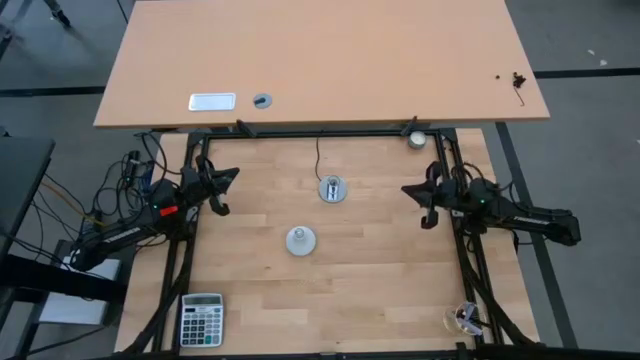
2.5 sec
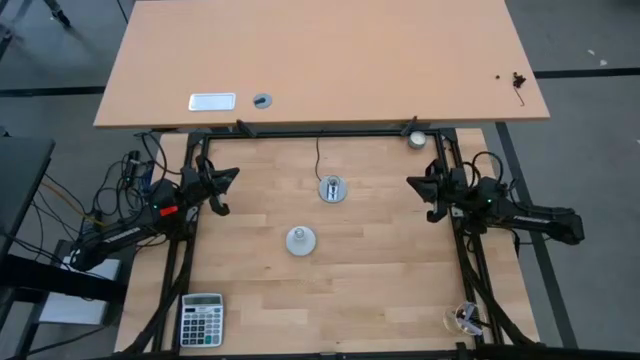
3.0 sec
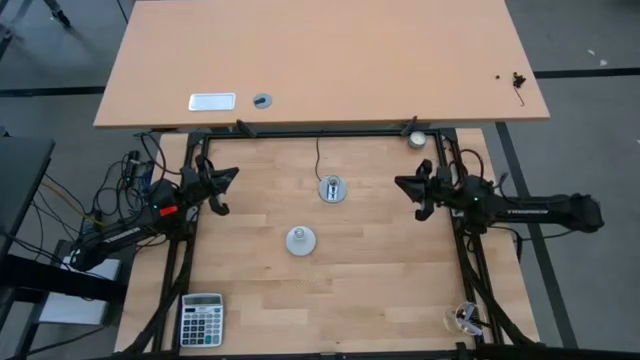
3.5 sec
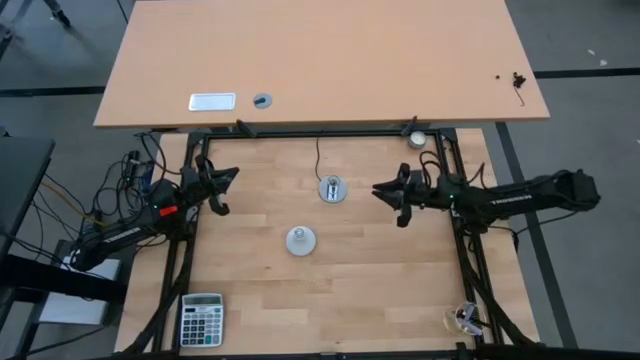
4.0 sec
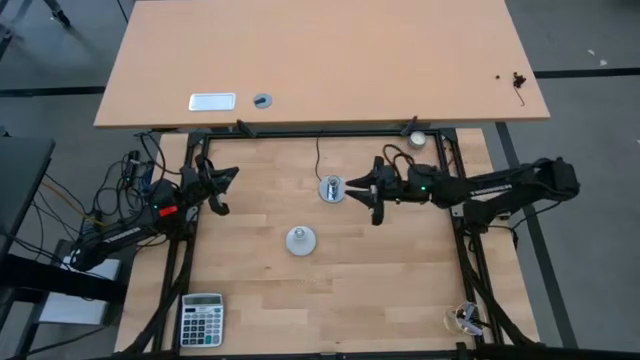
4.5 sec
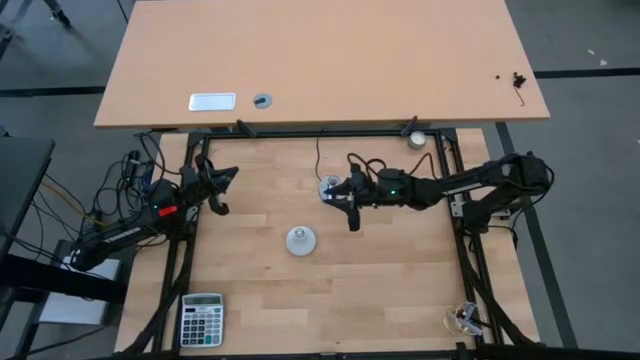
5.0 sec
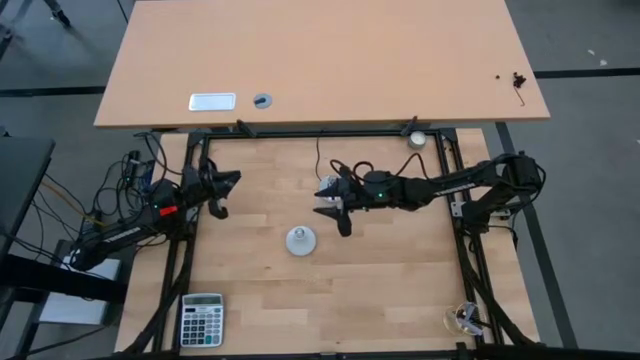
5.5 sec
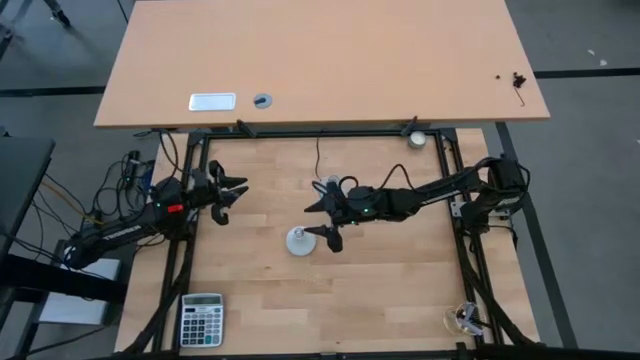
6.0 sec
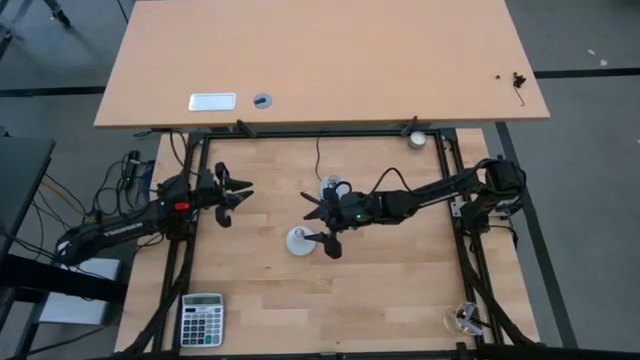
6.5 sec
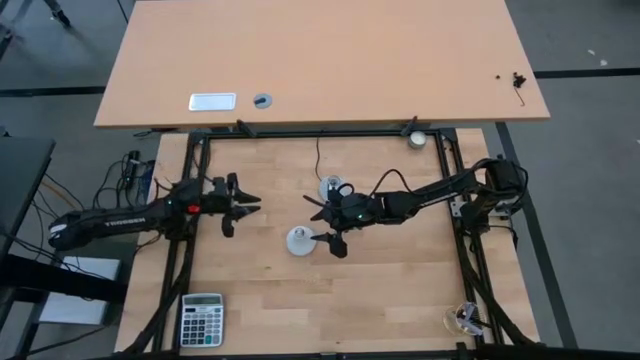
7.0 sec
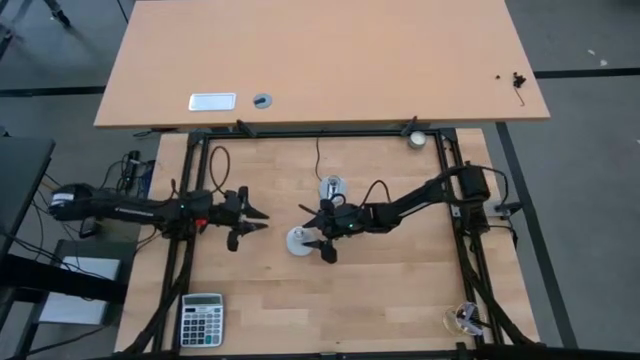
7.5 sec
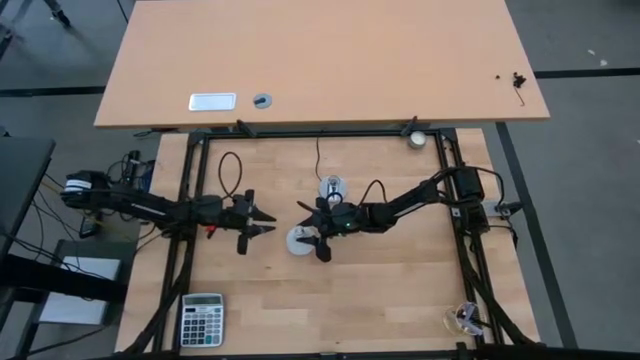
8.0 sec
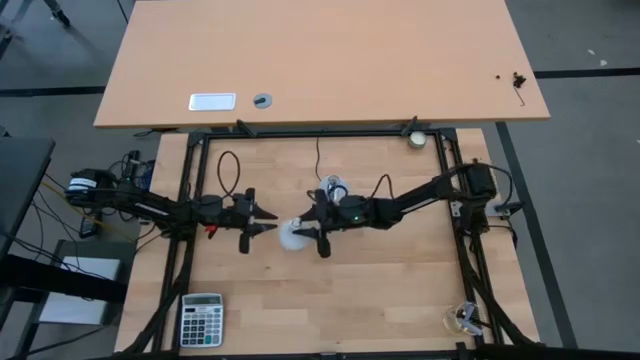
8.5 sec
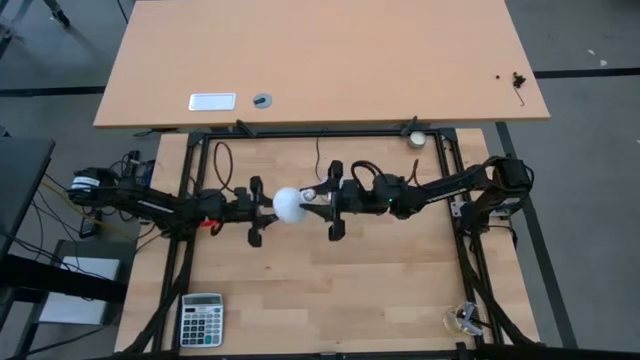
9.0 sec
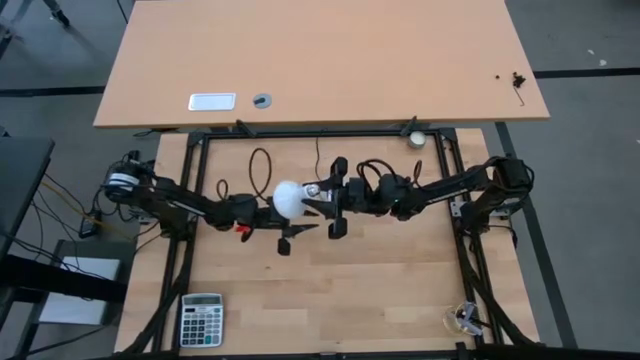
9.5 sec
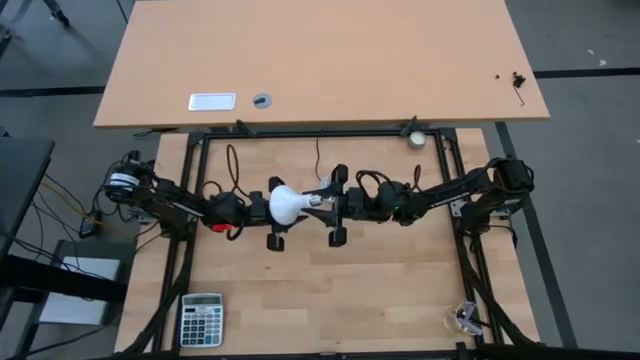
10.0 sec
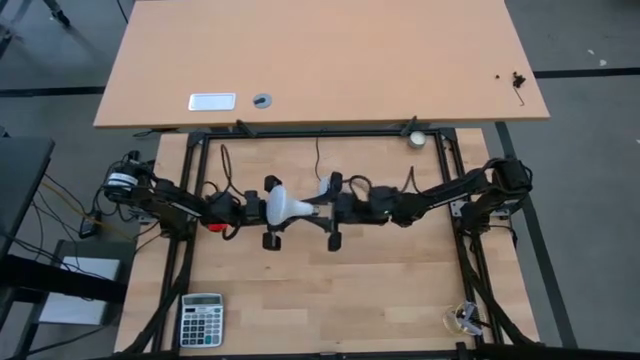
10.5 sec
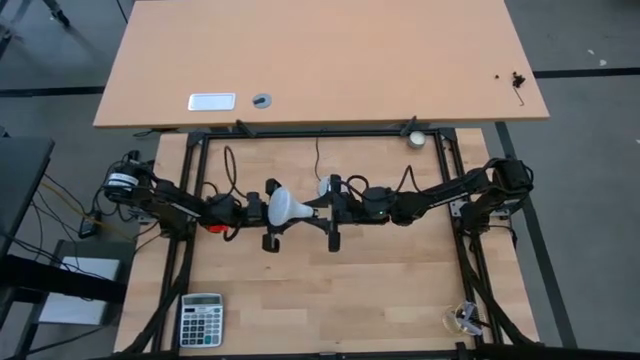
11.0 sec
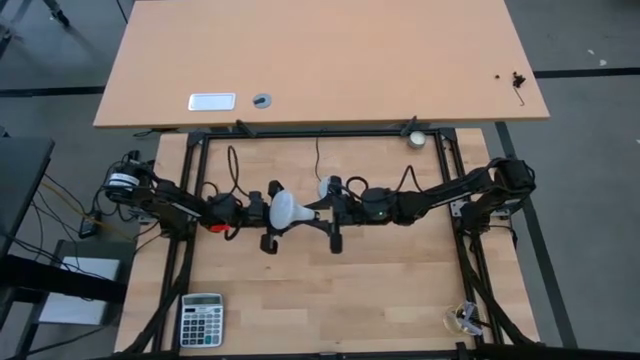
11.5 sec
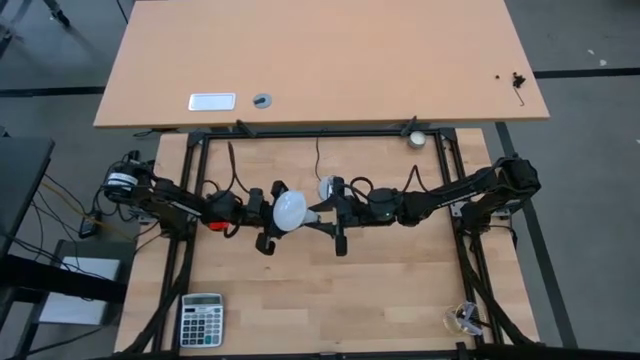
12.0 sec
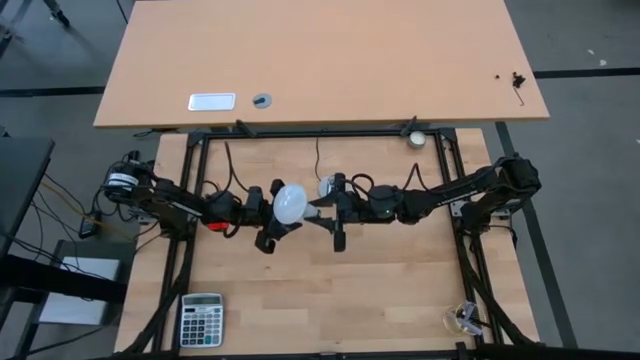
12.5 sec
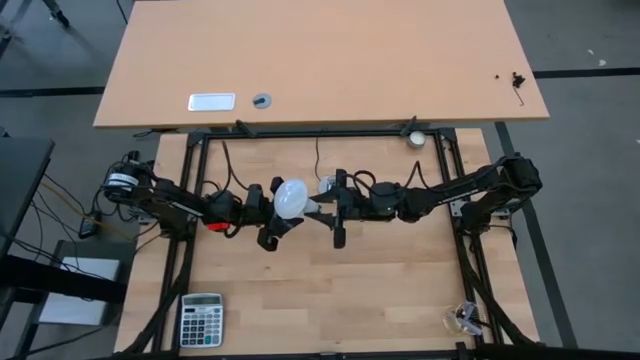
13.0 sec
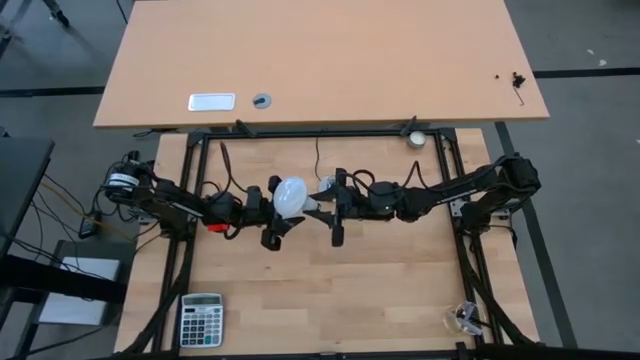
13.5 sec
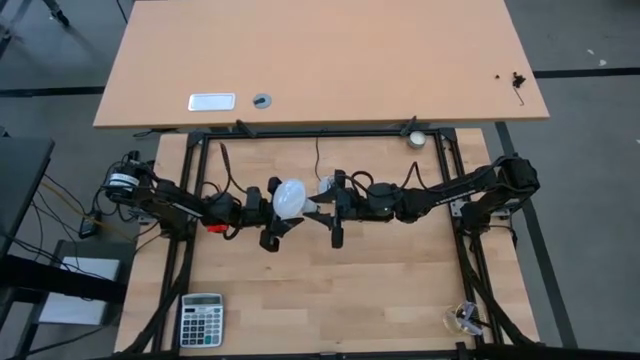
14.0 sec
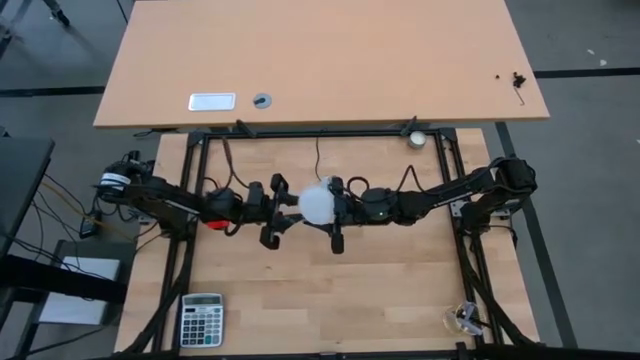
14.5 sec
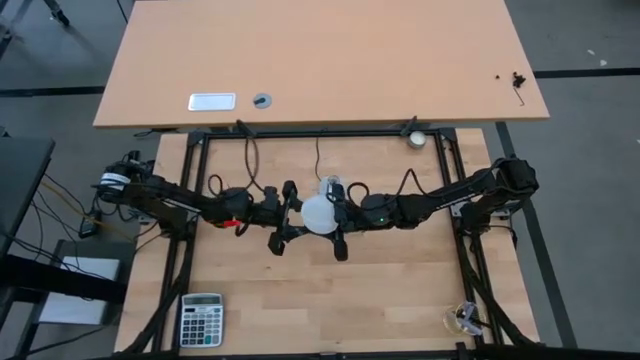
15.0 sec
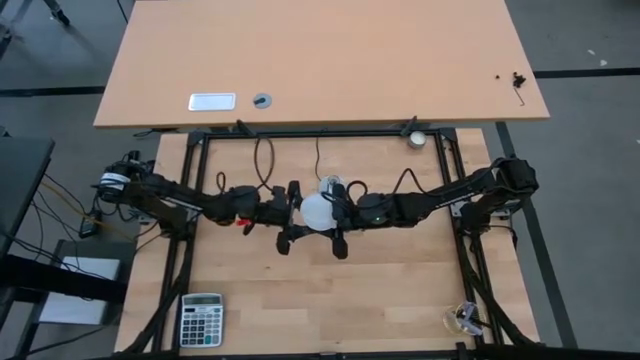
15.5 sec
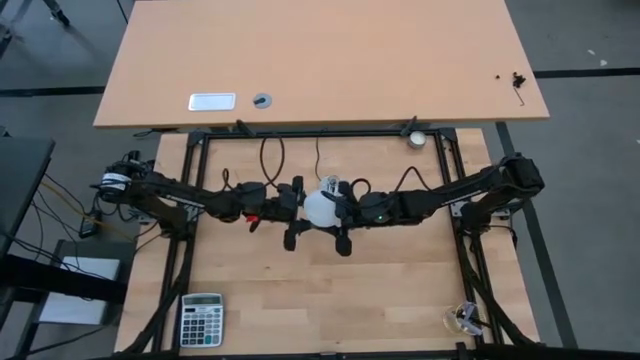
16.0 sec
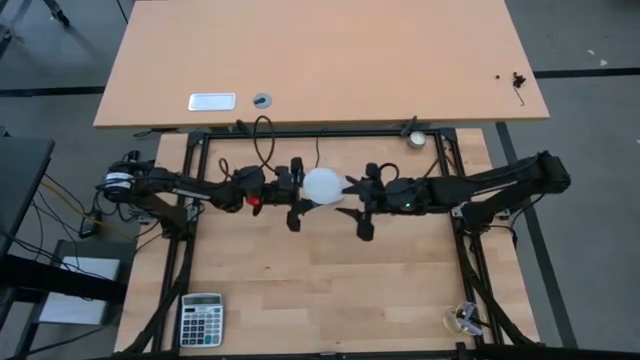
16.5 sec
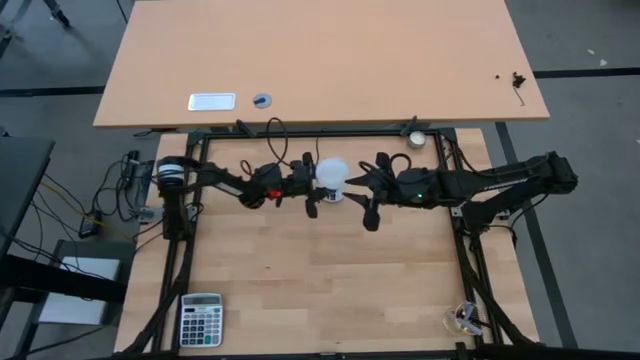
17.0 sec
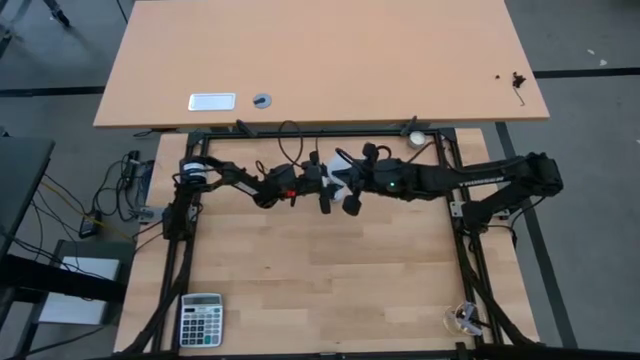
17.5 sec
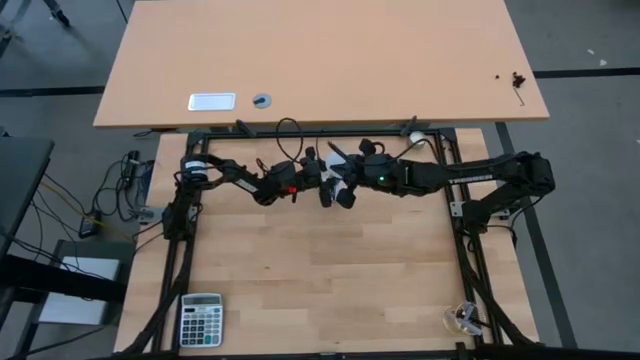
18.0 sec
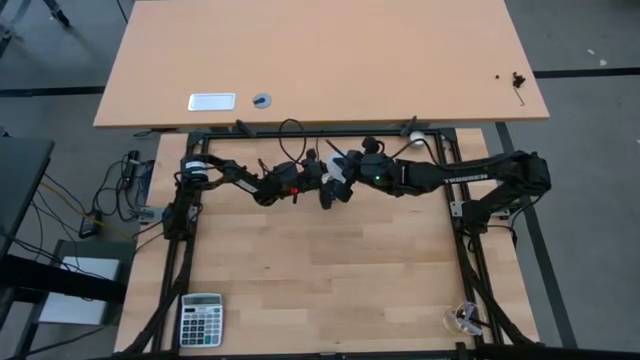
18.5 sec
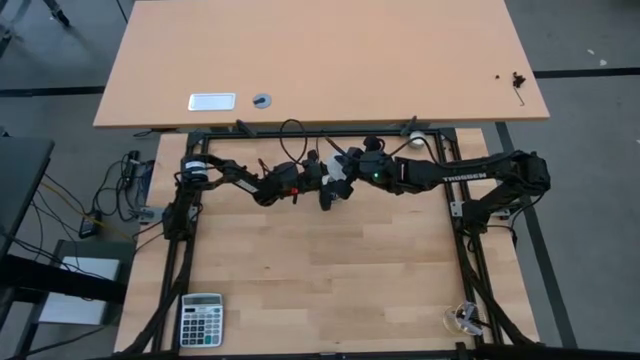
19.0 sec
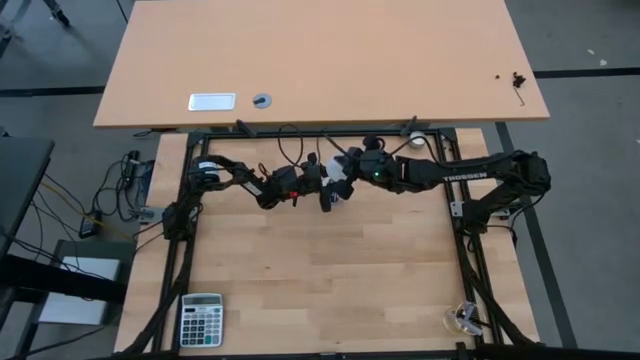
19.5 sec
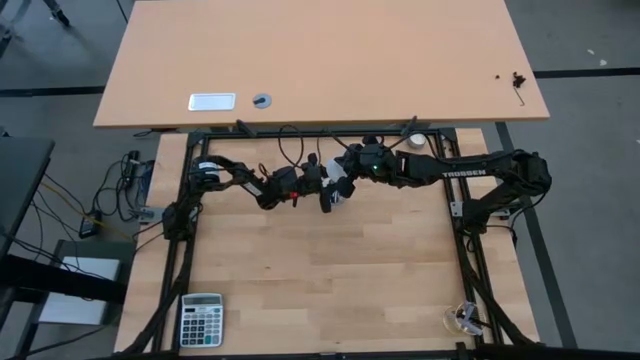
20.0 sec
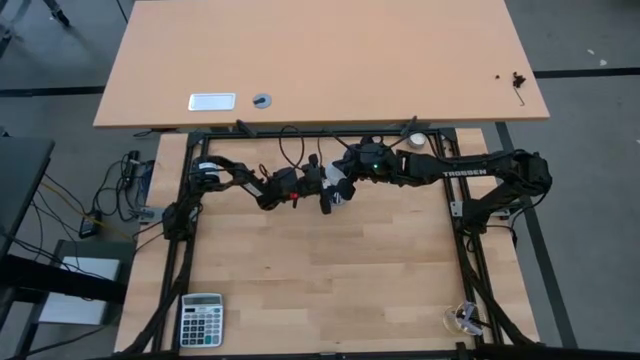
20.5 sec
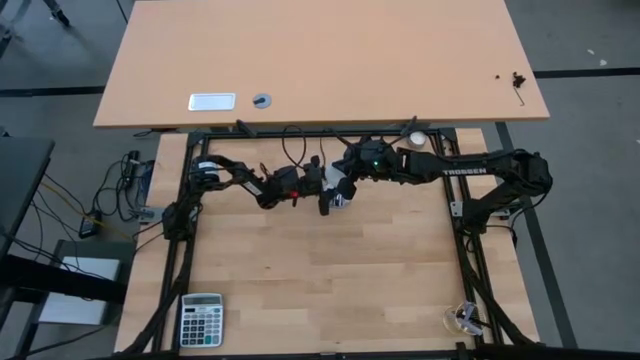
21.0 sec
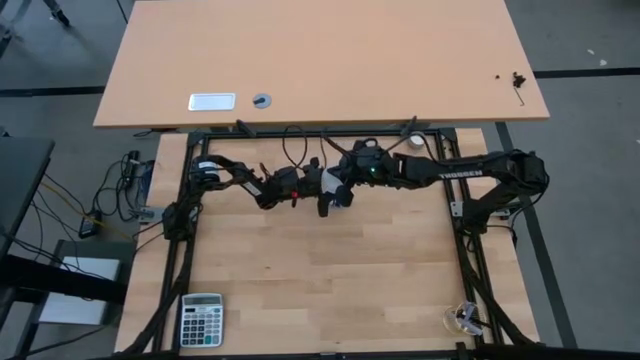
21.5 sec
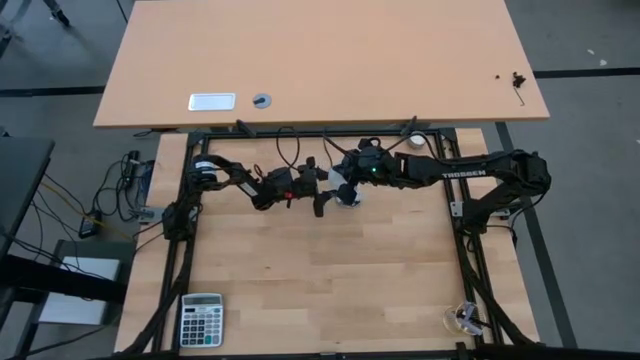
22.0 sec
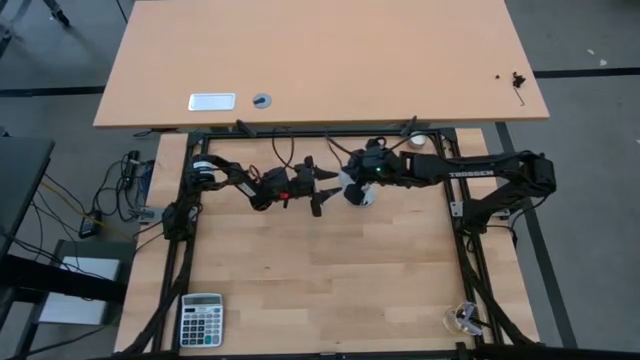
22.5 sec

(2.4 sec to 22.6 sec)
Task: Screw lightbulb
Insert the lightbulb into the silver lamp socket
